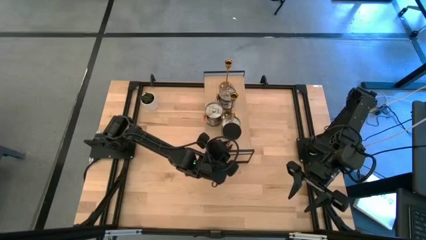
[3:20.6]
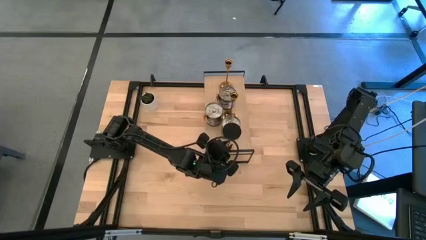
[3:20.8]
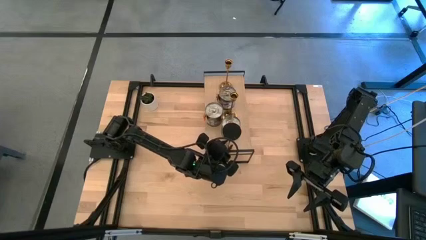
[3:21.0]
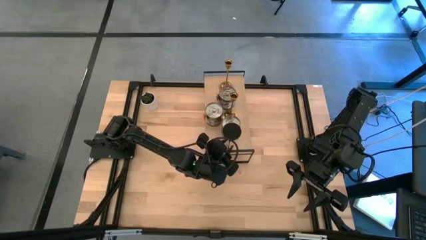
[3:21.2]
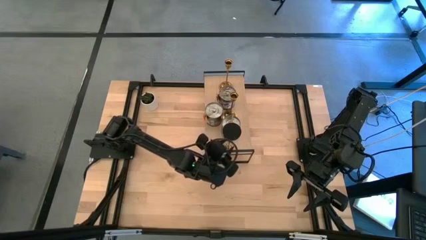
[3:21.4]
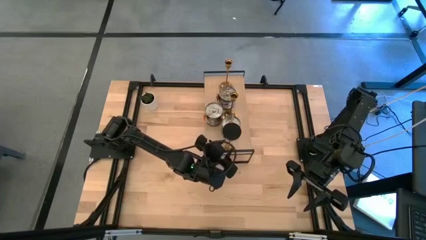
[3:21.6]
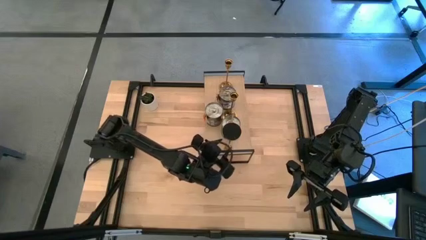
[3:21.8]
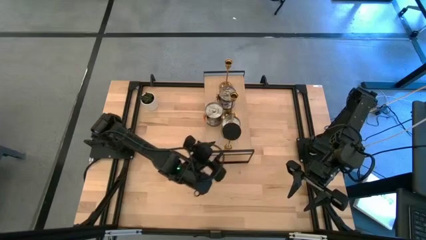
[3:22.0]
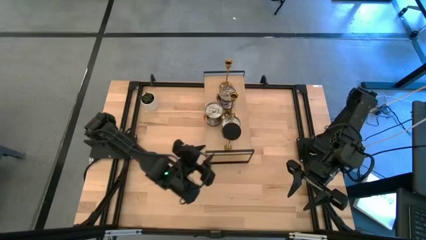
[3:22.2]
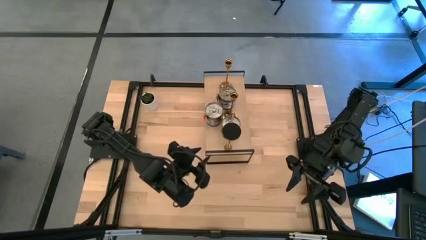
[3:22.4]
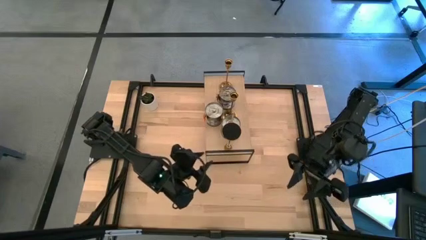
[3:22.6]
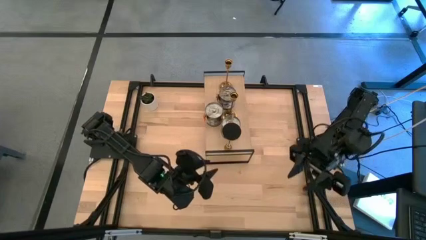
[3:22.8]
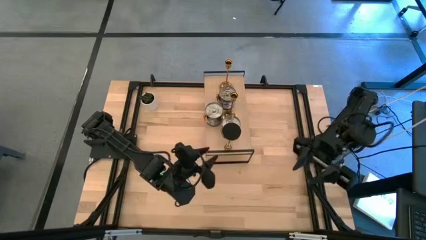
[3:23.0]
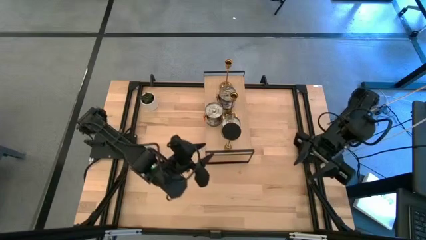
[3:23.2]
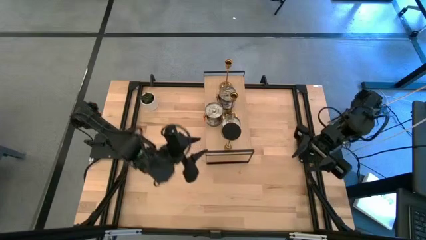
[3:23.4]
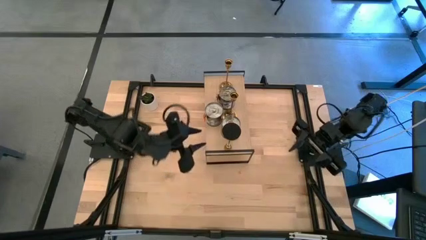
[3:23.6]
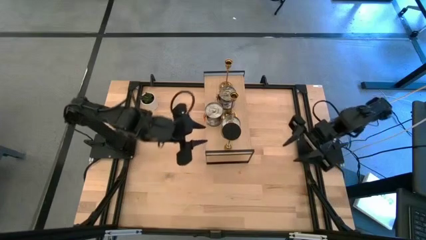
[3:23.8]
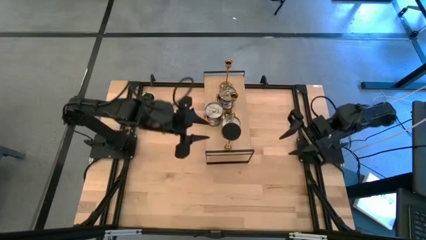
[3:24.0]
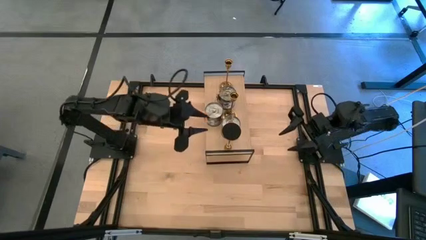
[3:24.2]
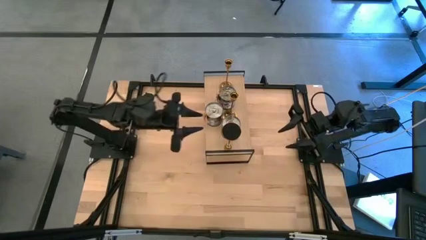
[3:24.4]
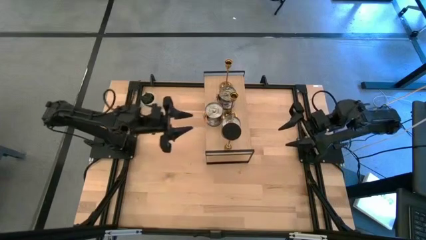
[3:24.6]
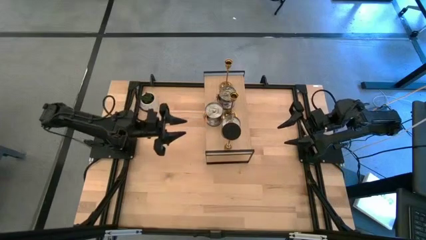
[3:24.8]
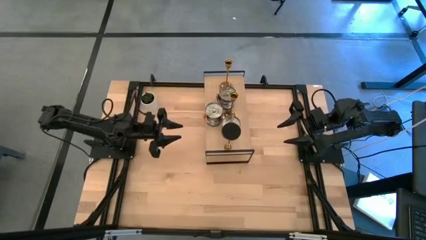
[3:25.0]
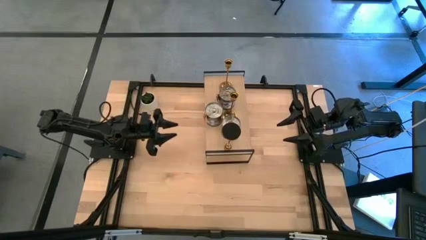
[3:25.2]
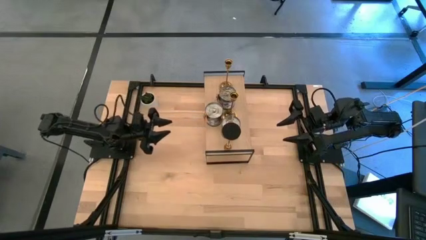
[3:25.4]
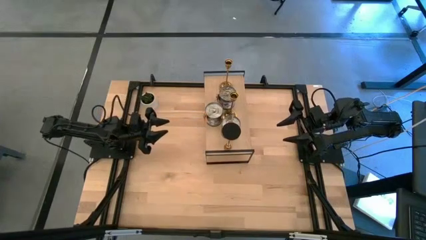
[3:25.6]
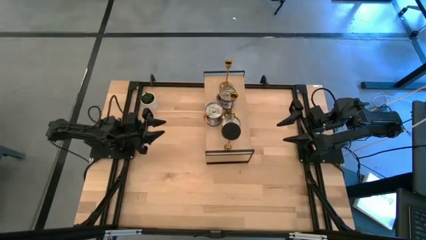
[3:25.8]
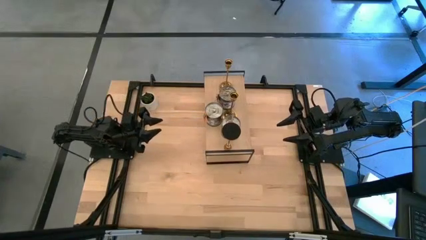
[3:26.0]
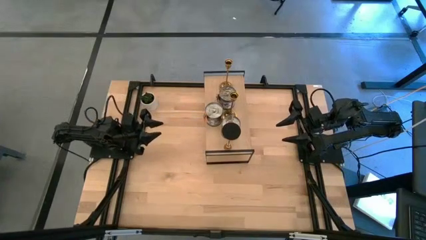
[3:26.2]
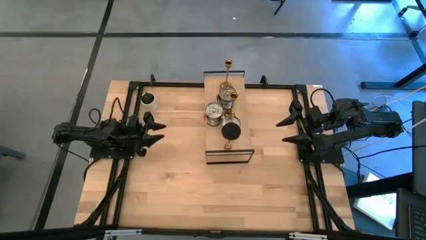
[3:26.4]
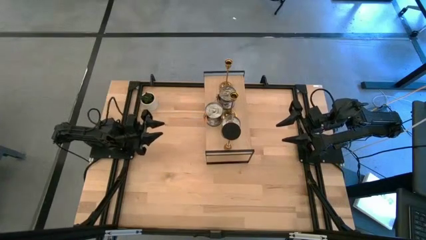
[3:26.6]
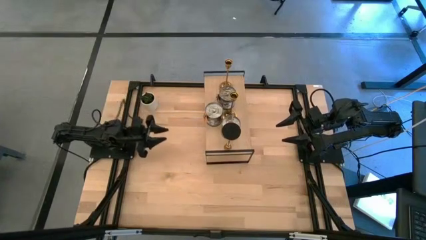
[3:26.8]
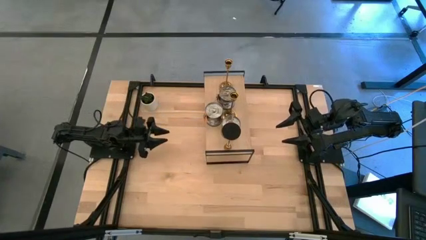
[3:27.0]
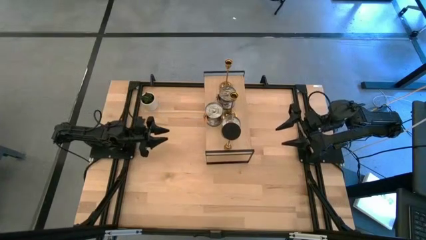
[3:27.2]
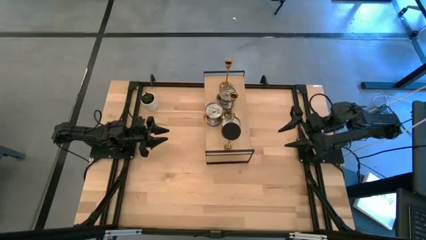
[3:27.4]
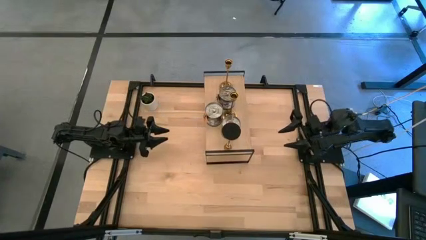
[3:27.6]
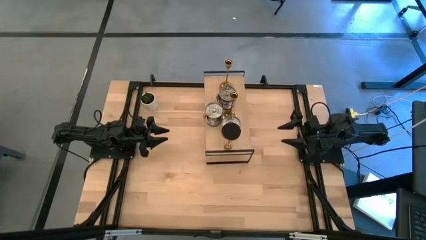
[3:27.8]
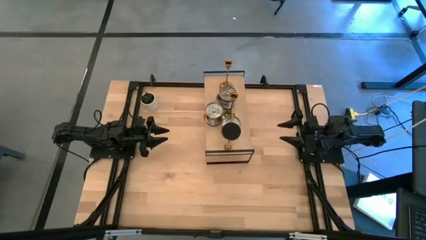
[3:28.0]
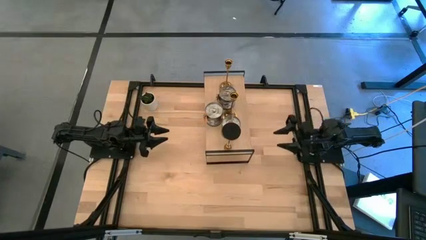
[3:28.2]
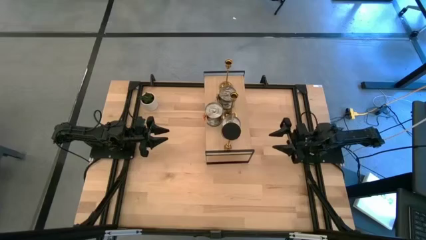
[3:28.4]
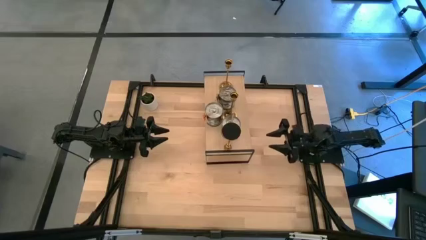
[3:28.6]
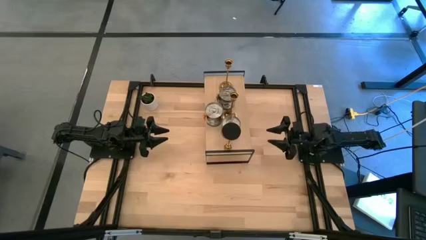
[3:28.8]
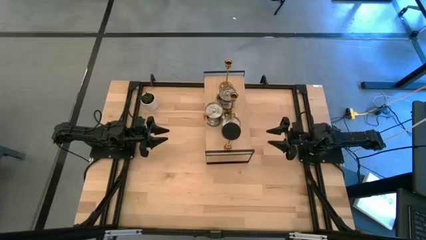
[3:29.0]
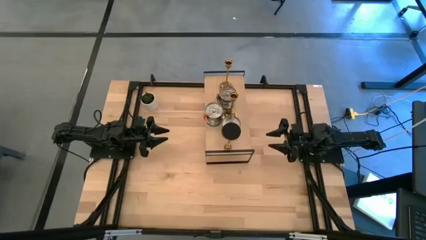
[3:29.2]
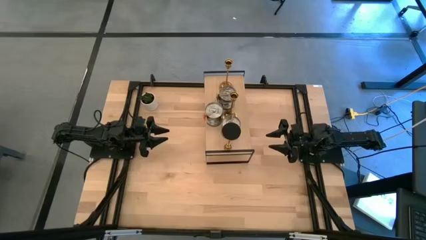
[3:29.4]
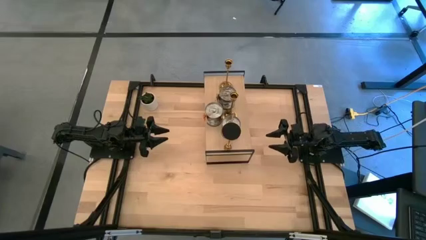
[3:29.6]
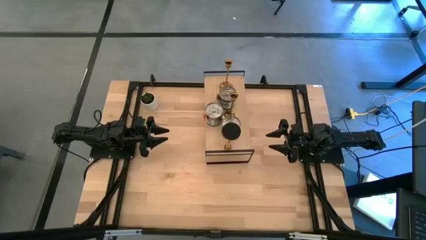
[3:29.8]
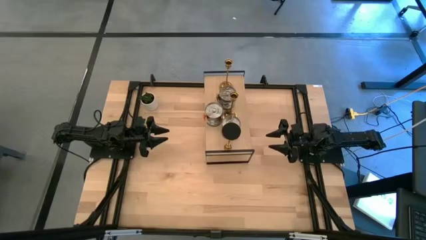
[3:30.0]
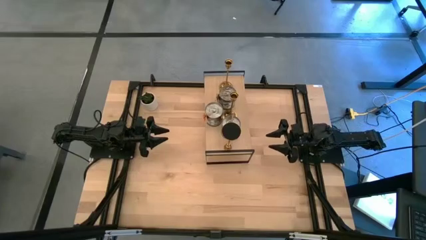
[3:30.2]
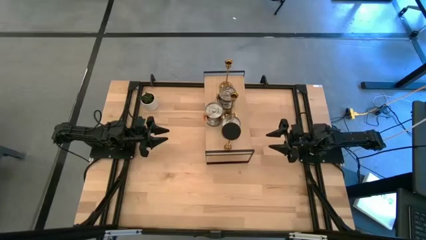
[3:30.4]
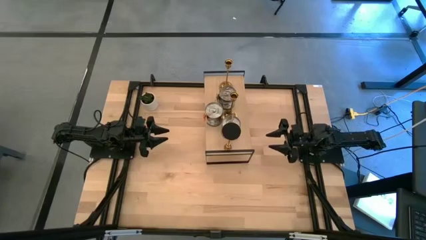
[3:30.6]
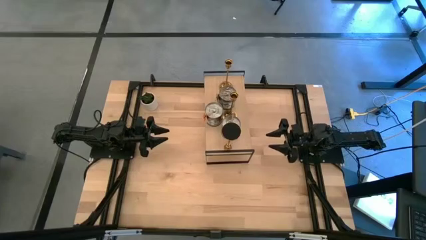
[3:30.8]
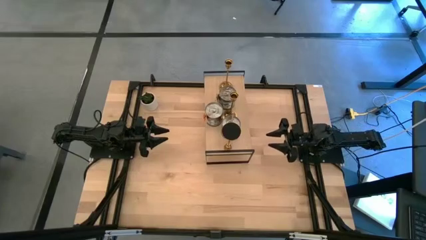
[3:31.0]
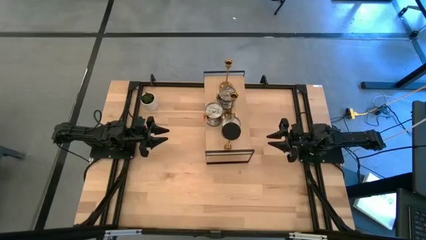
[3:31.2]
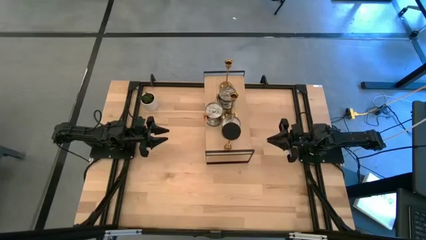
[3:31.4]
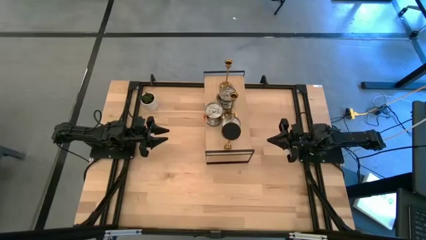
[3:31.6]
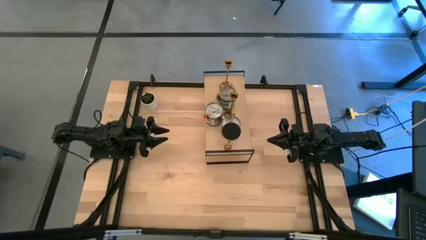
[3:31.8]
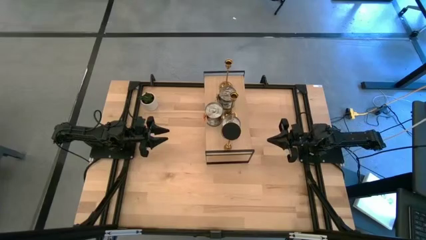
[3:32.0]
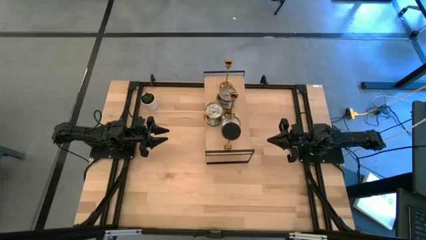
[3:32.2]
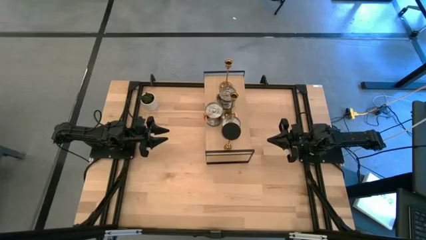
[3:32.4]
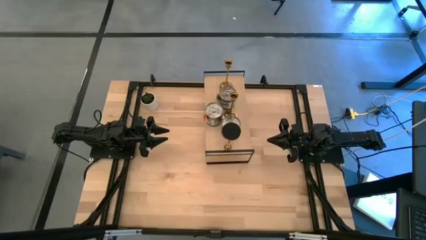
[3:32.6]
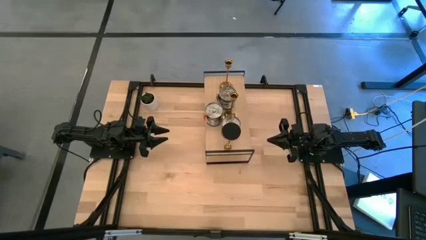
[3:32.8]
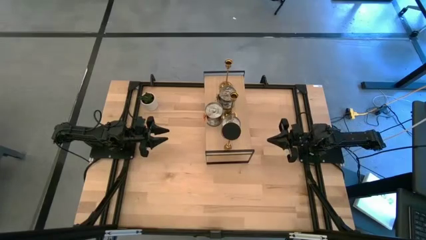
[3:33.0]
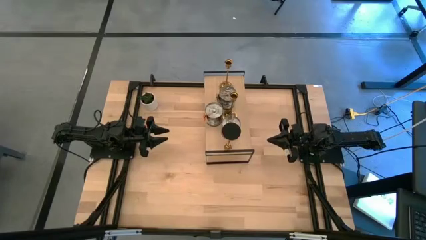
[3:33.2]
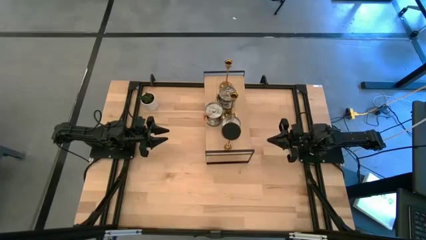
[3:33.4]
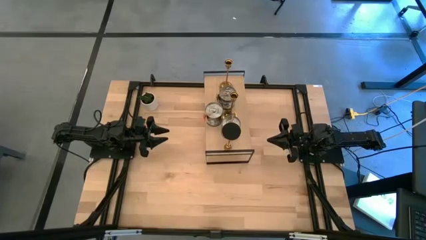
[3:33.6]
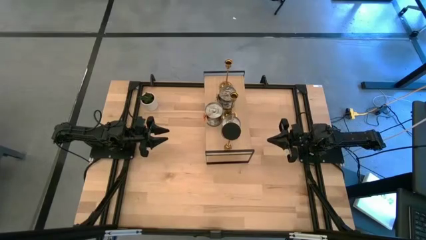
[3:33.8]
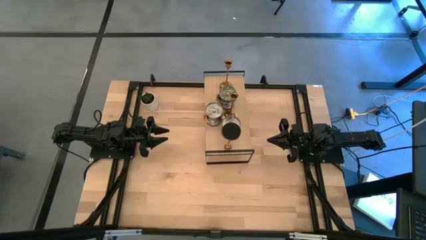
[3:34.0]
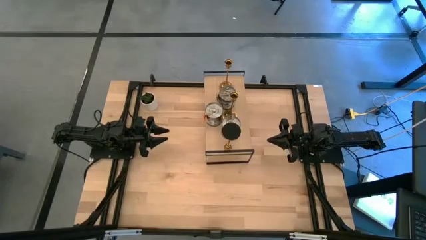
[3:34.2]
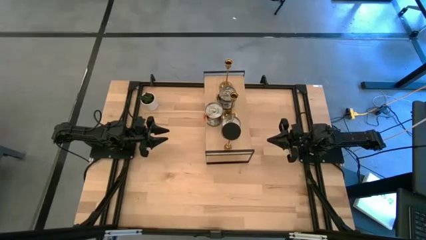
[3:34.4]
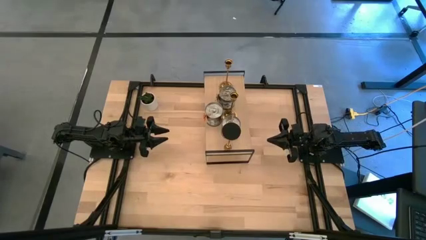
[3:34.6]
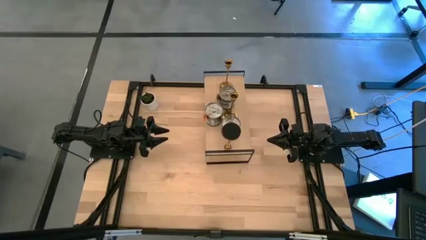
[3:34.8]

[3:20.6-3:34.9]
Task: Pick & Place candle stick holders
Return to Home Position

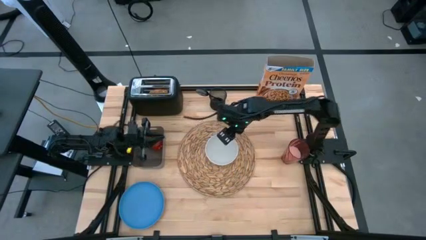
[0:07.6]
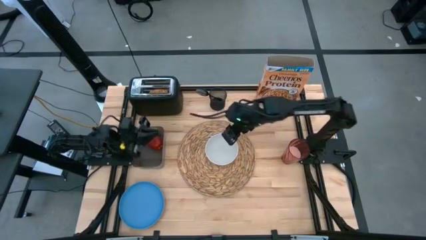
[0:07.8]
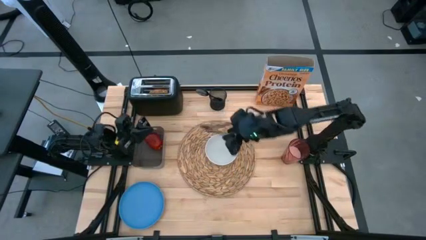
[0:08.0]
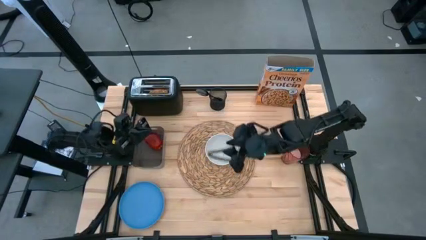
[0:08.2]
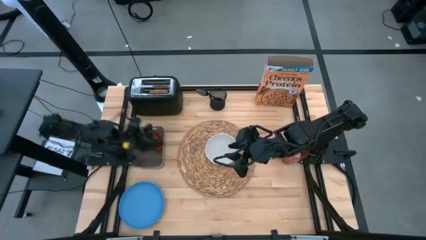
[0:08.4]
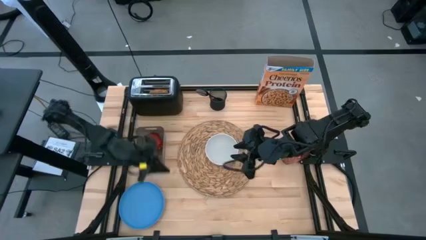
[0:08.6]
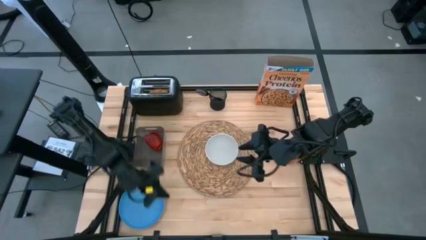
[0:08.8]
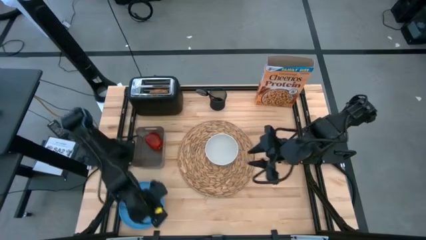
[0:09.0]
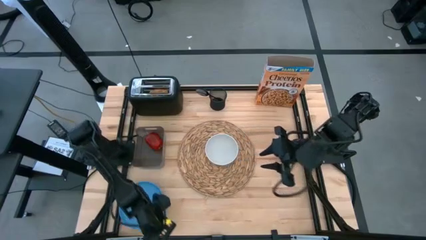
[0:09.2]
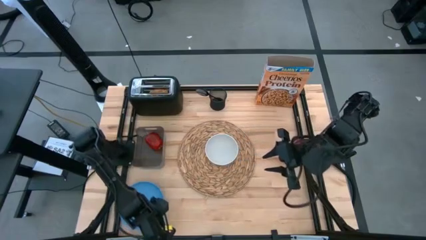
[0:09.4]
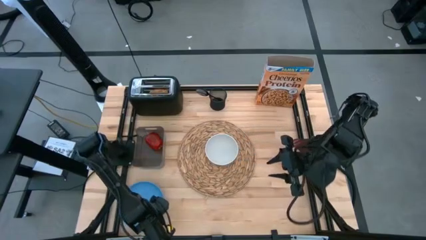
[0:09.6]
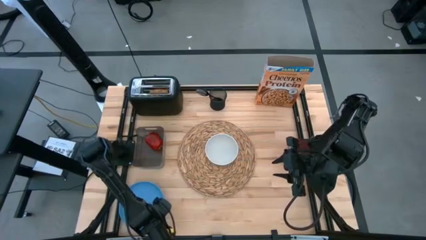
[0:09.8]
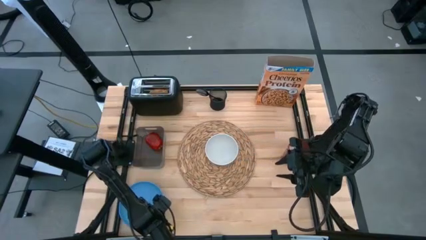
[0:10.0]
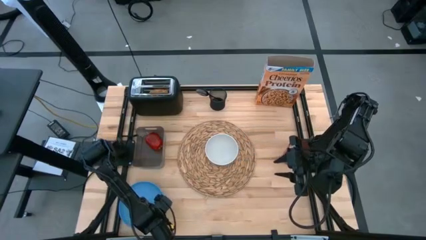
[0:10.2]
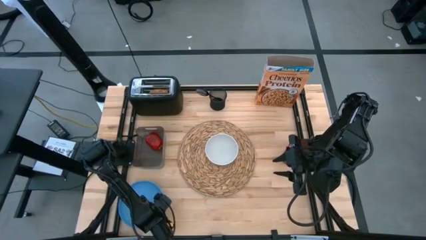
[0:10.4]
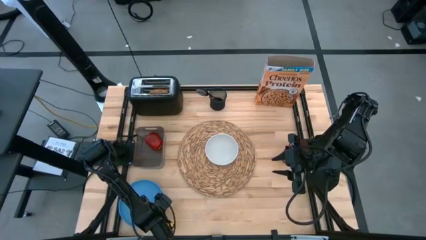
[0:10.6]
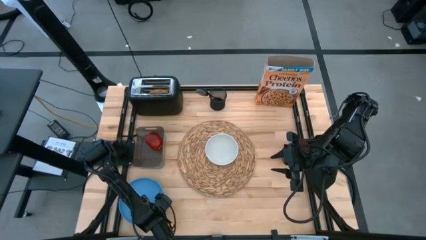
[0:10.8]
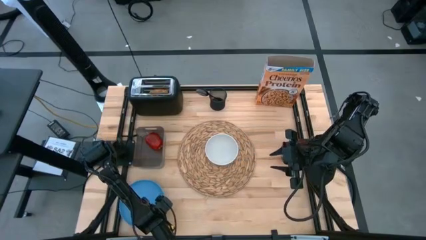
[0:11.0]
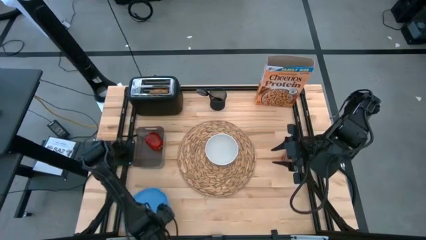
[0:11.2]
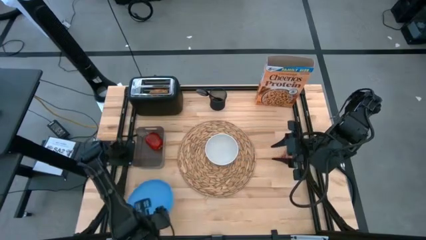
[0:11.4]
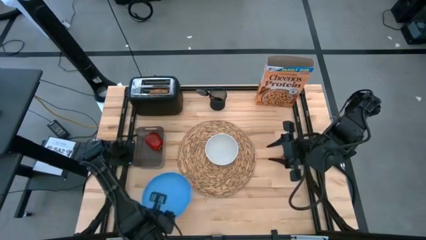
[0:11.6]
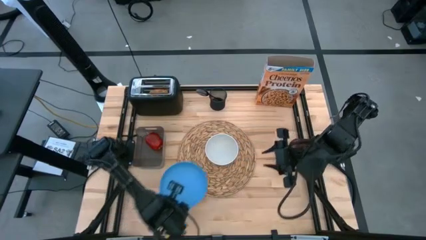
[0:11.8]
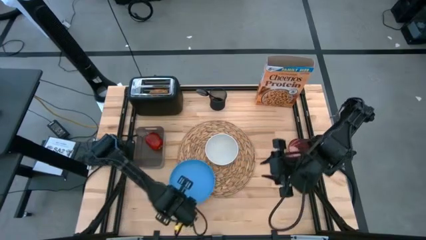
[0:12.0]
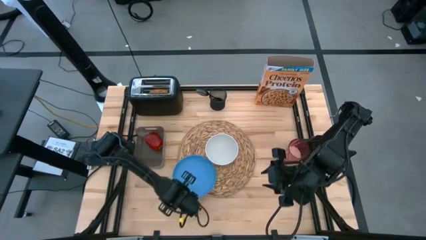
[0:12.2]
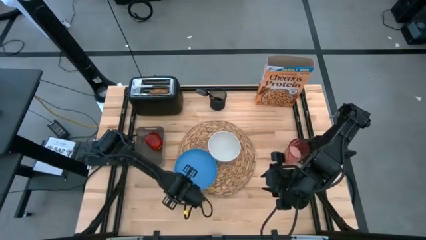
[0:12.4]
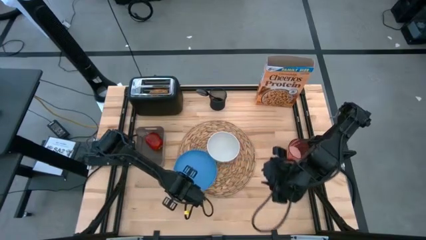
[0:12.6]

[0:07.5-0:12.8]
Task: Arrange a breakfast setting
Put the blue plate on the brown woven mat
